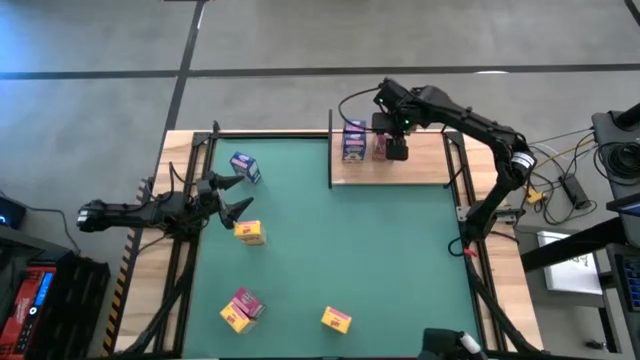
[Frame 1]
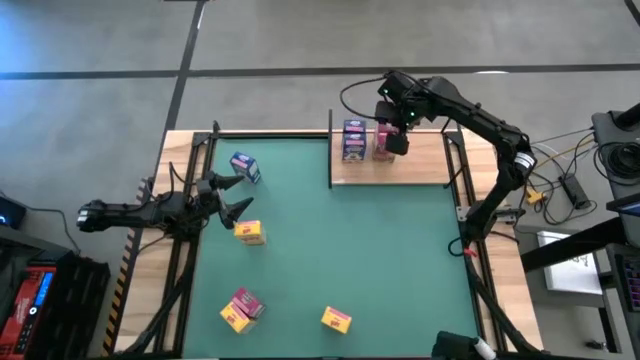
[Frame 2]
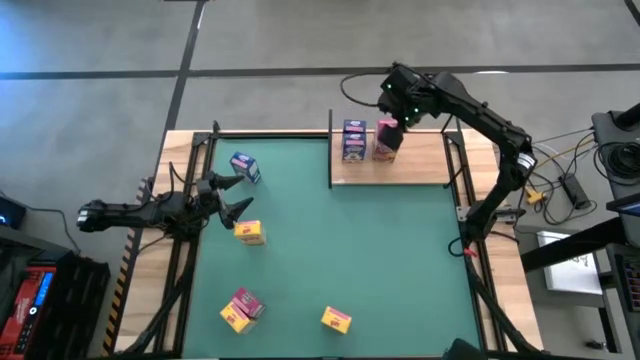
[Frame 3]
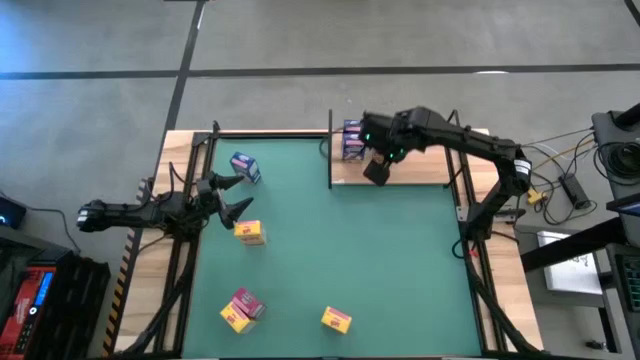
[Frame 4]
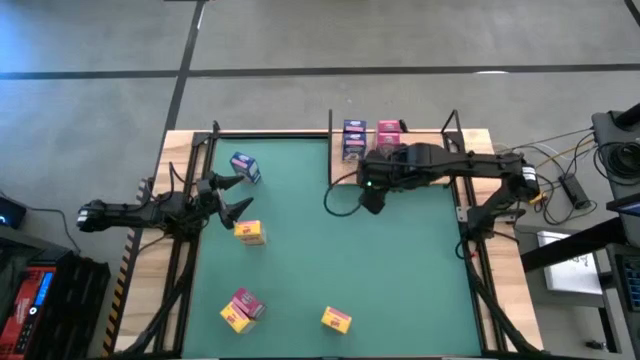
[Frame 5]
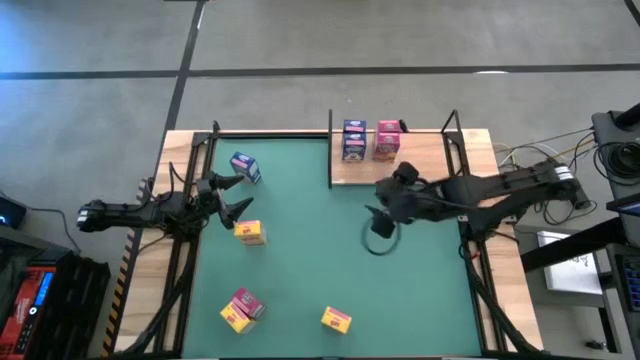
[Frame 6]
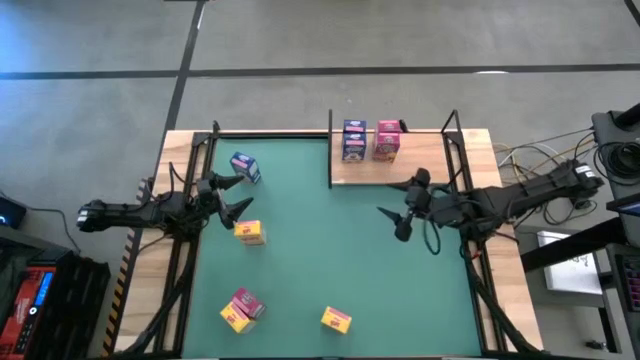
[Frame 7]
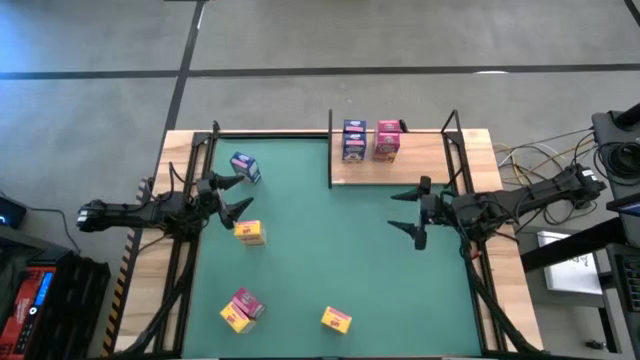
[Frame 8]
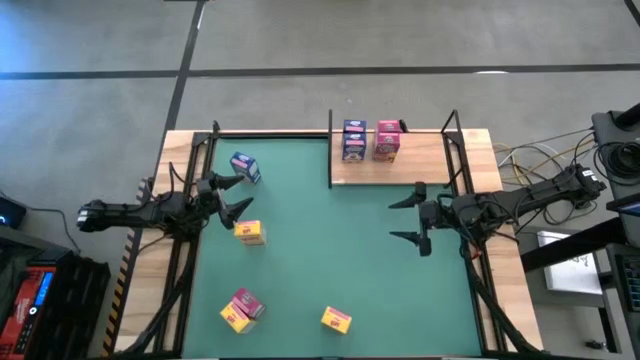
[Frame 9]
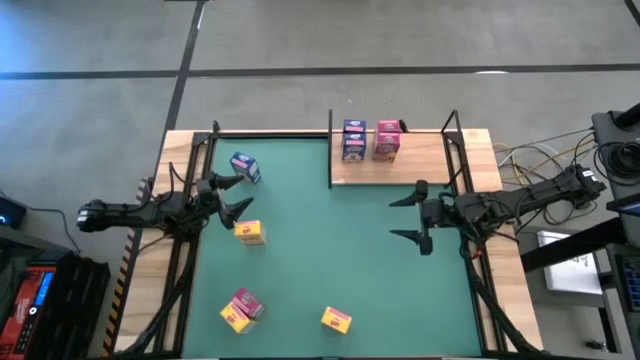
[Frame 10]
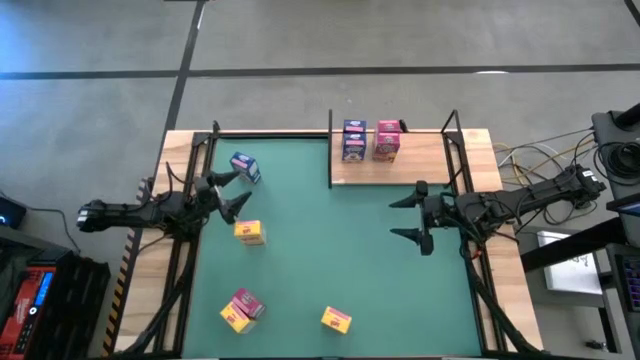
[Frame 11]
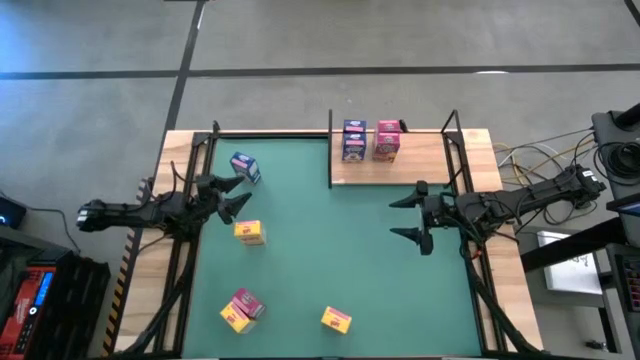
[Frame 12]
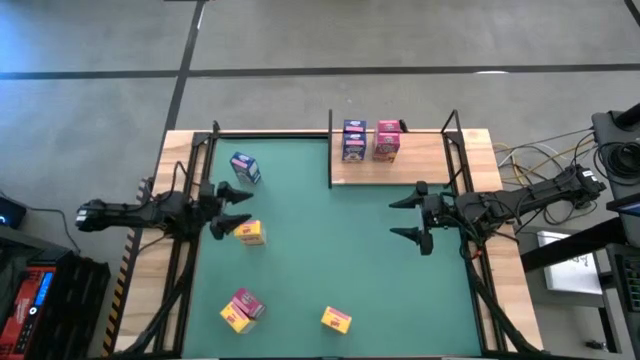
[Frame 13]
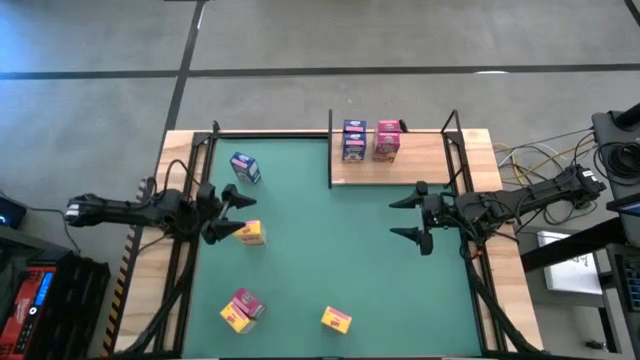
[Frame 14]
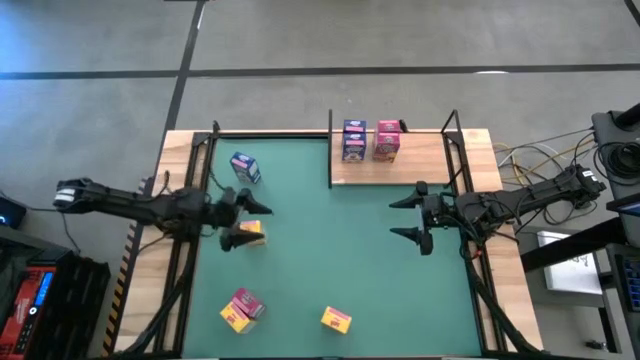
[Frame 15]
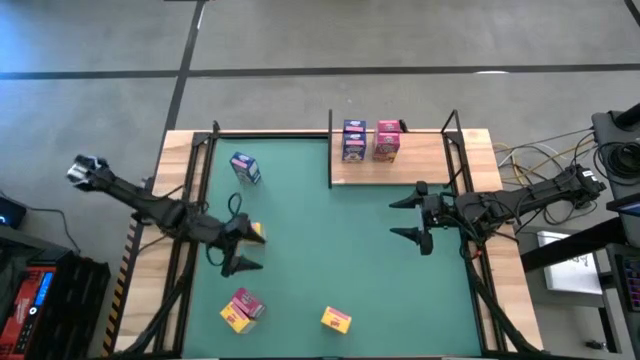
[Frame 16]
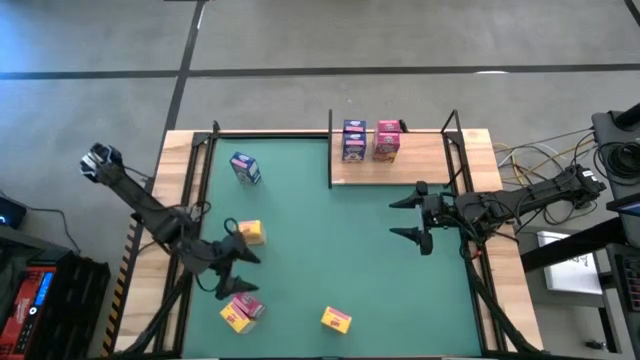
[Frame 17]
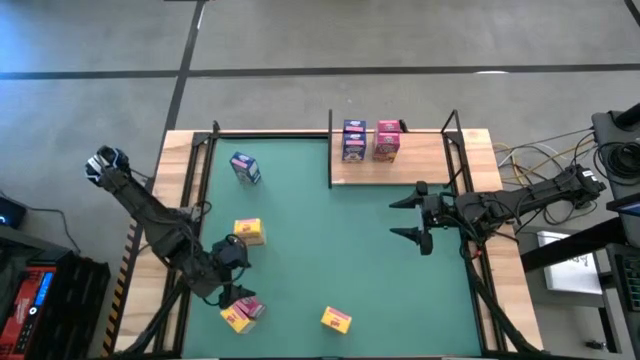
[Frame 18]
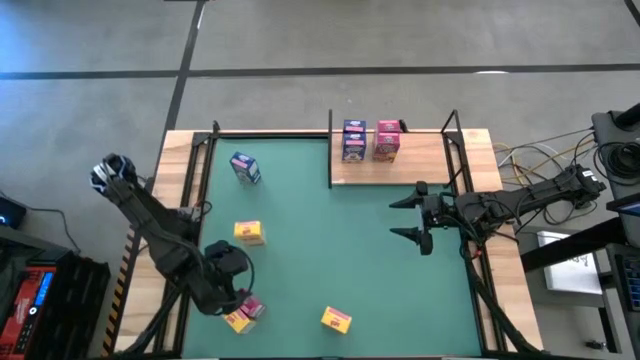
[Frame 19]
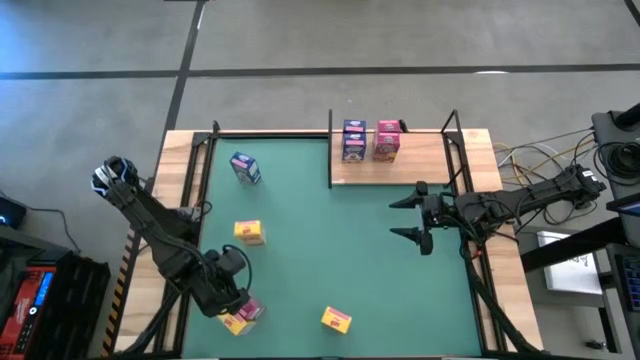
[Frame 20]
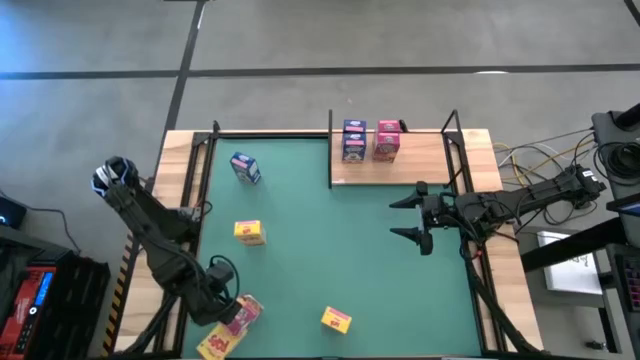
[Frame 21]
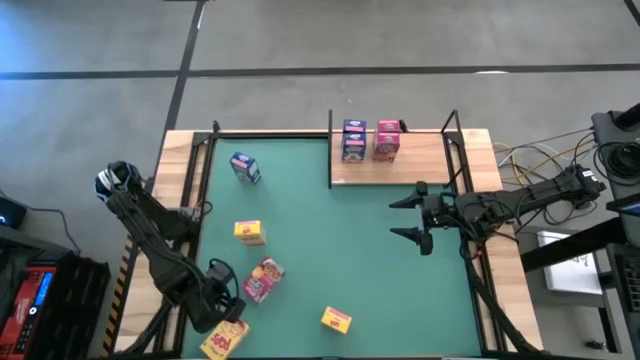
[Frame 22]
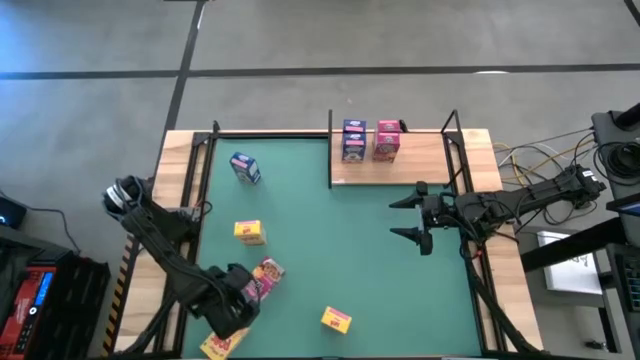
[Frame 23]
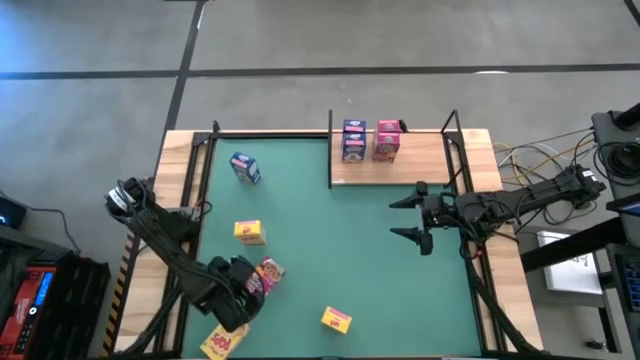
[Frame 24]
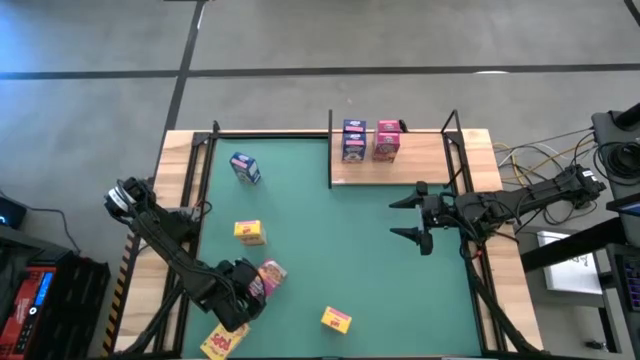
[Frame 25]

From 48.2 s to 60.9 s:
Task: Stack cereal on shelf
Put the pink cereal box on the shelf

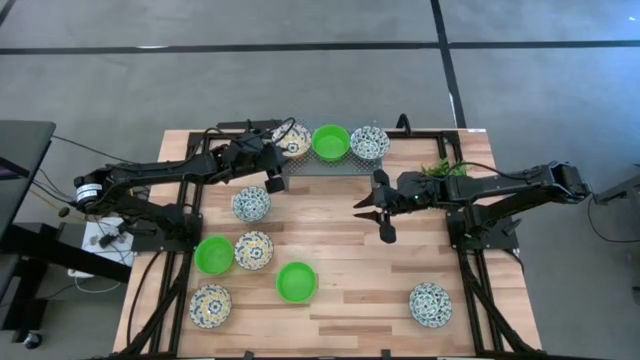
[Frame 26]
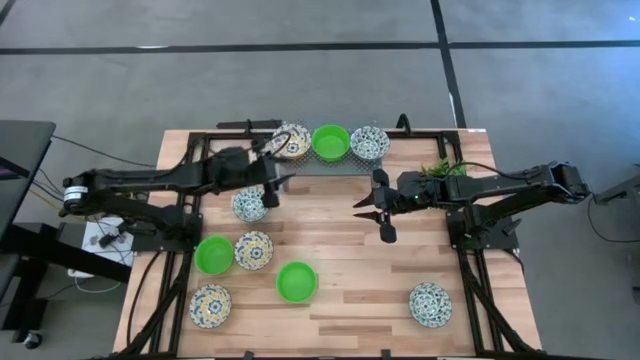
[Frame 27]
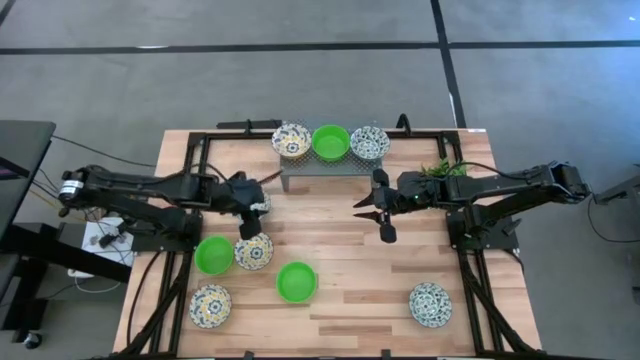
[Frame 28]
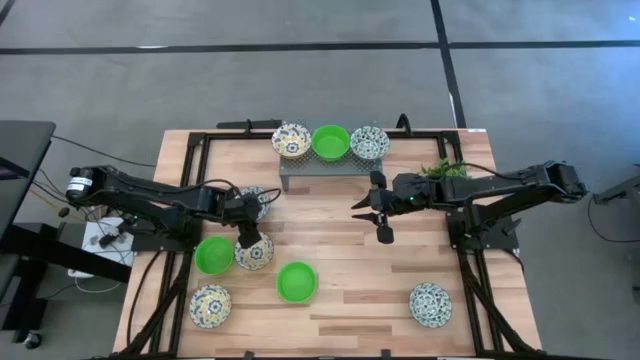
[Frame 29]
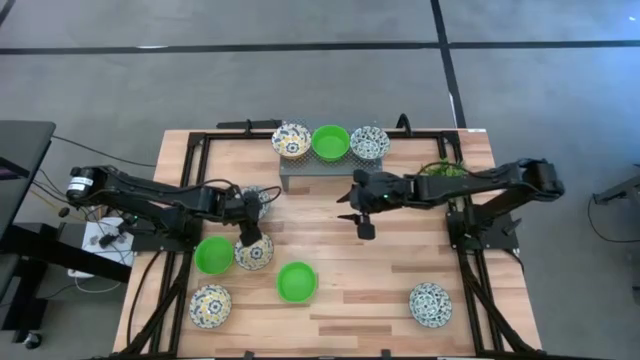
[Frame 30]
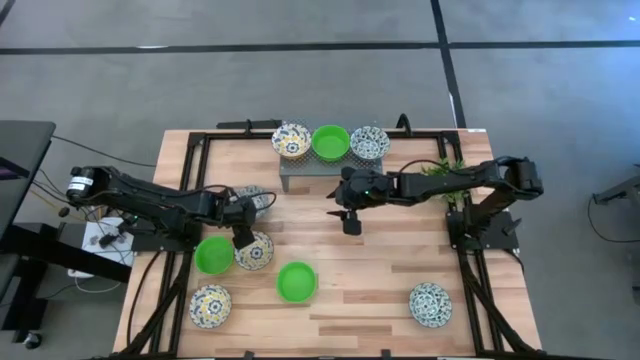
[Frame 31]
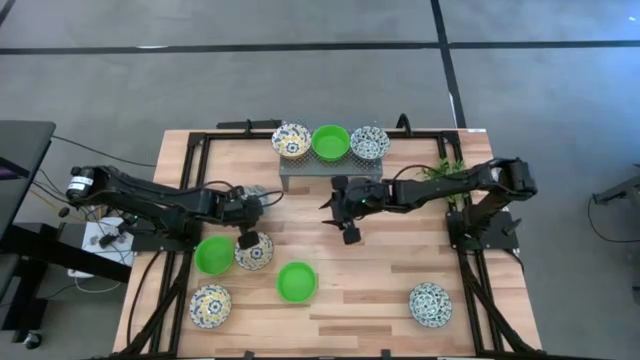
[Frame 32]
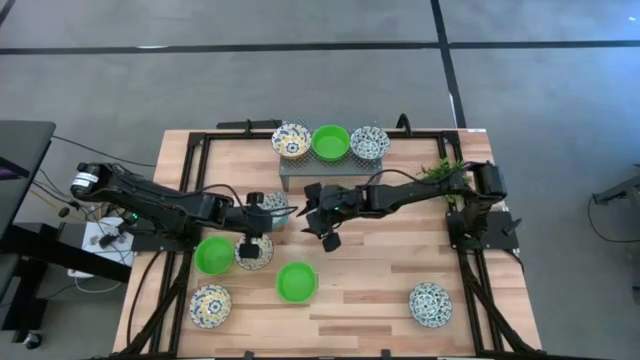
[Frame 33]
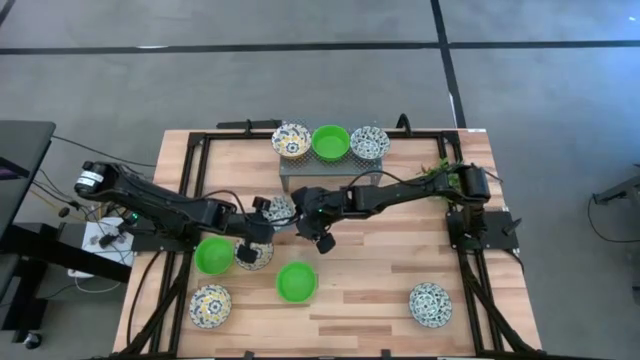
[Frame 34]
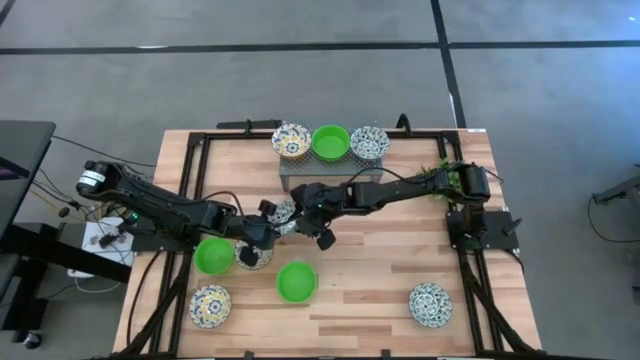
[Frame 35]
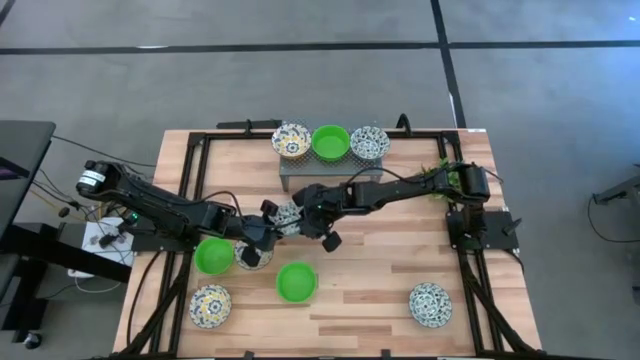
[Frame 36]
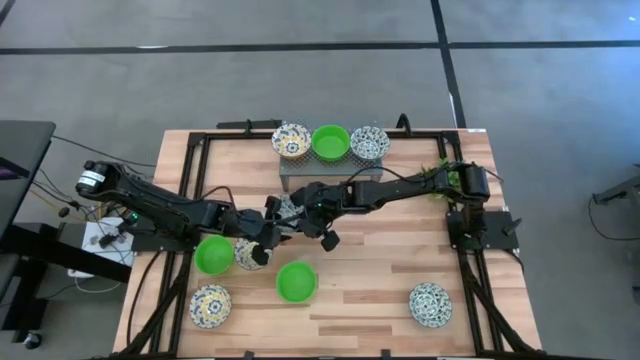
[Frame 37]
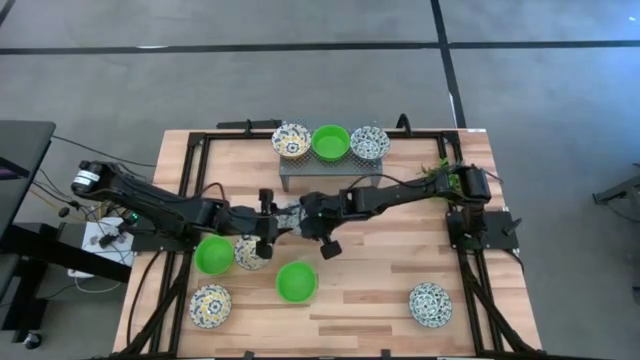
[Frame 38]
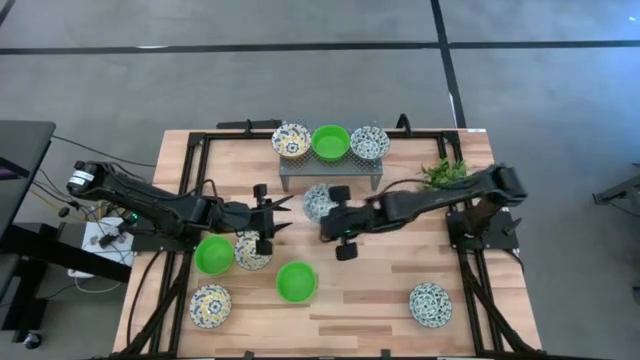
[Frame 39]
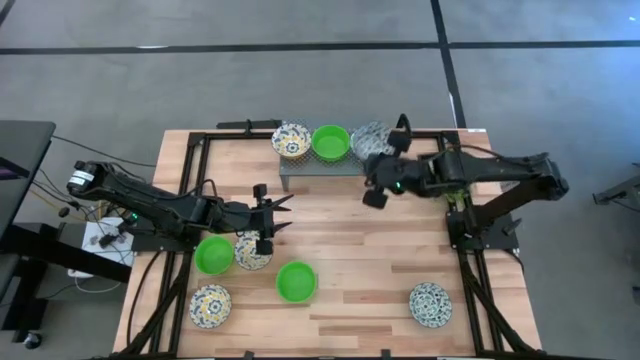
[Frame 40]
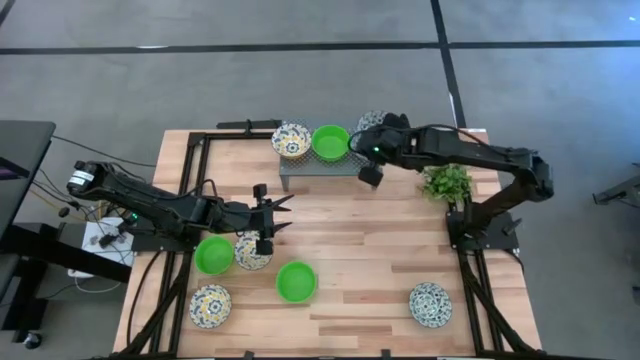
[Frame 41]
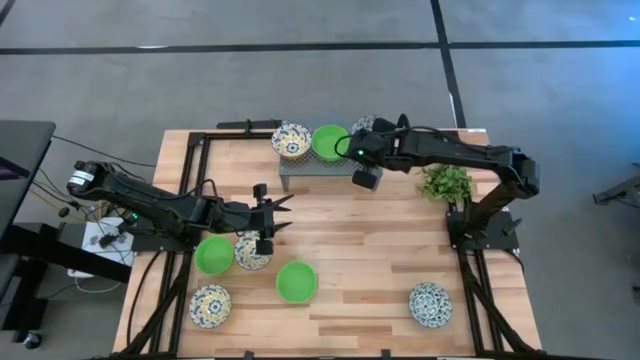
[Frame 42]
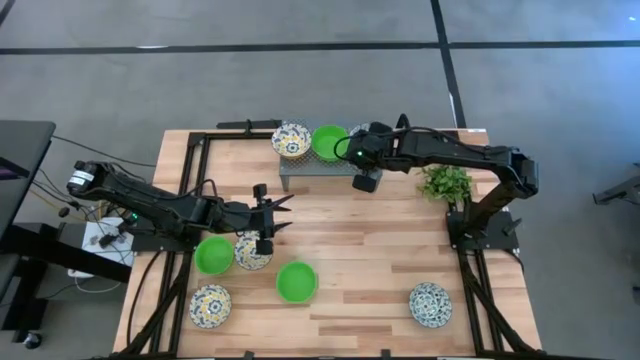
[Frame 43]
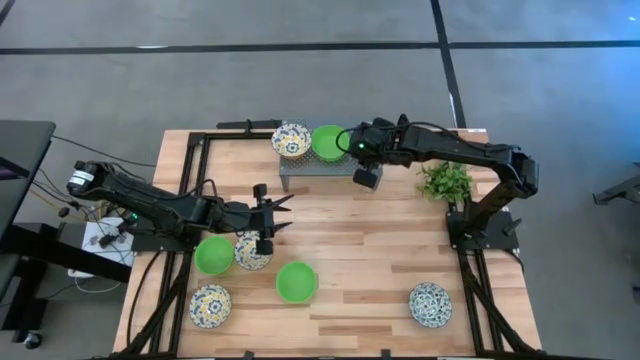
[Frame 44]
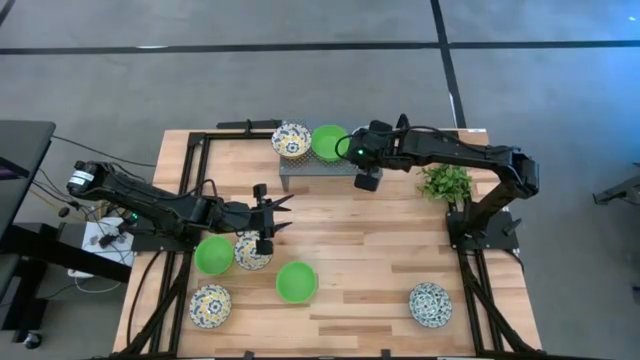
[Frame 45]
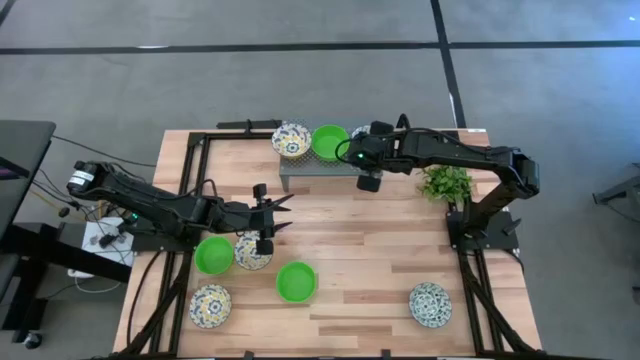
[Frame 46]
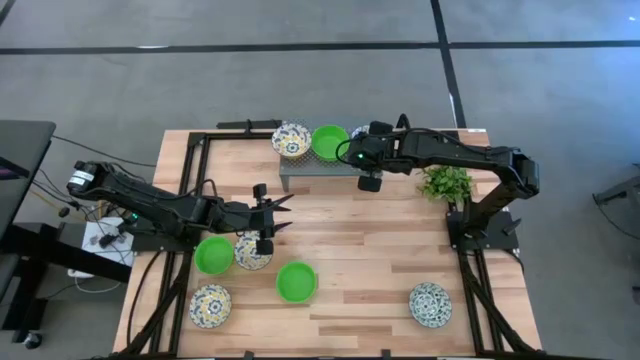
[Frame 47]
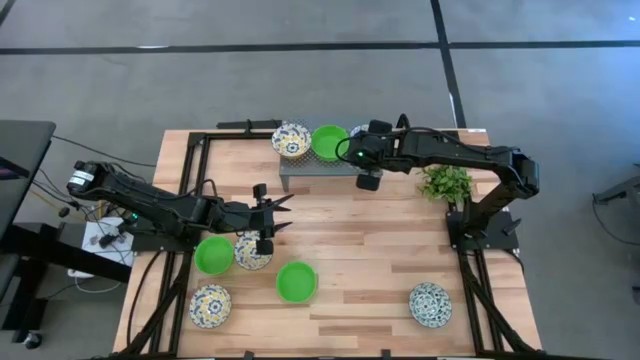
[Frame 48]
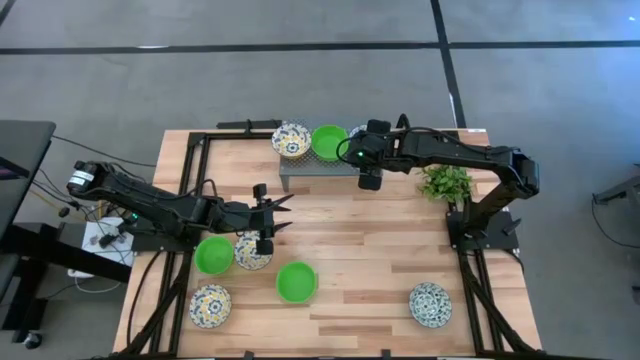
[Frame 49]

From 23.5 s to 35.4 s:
Task: Pick & Place Mini bowls
Stack the top green patterned bowl on top of the green patterned bowl on the shelf
